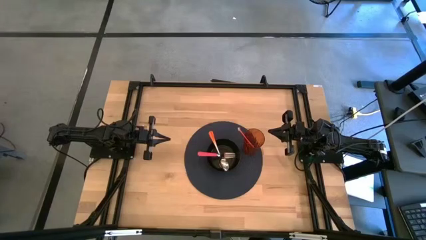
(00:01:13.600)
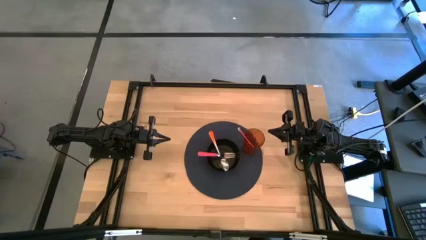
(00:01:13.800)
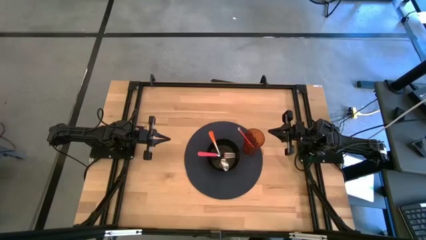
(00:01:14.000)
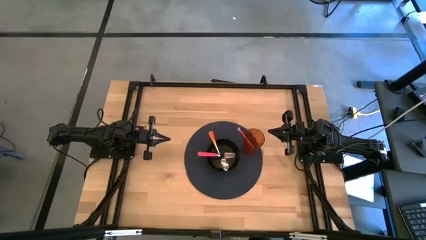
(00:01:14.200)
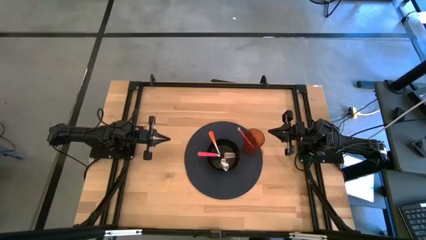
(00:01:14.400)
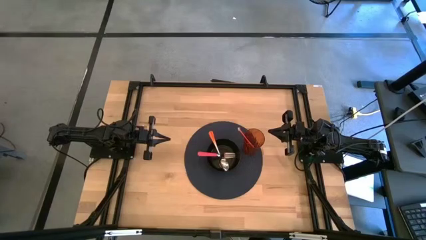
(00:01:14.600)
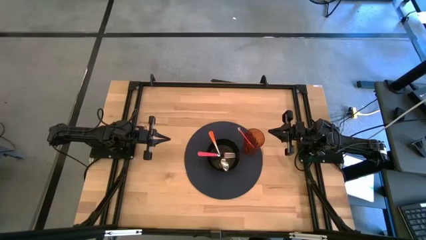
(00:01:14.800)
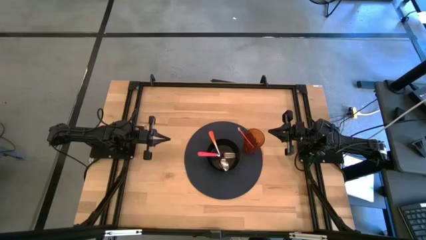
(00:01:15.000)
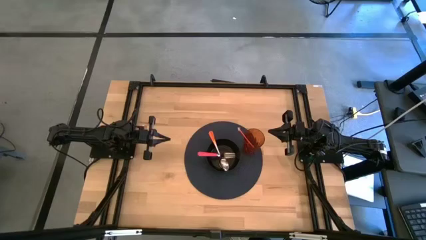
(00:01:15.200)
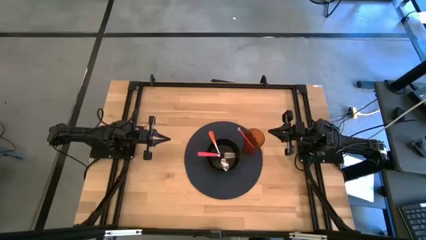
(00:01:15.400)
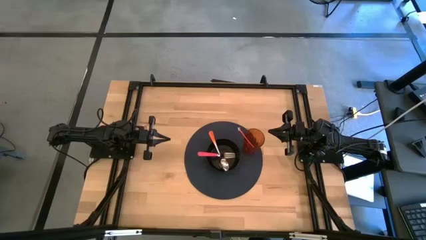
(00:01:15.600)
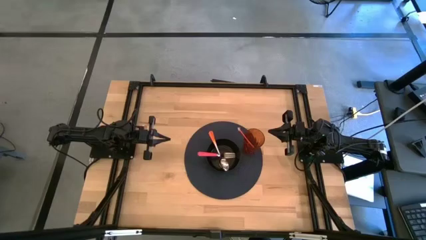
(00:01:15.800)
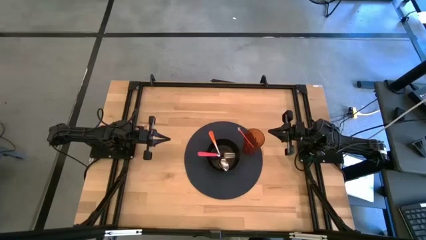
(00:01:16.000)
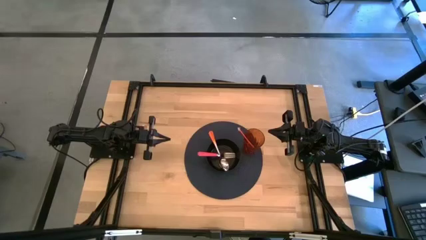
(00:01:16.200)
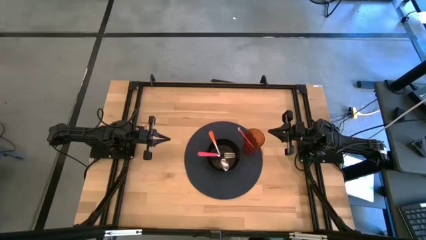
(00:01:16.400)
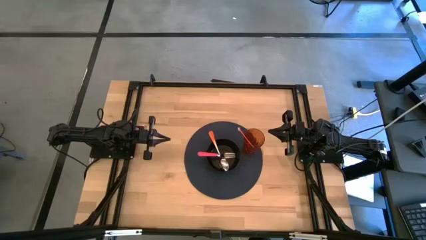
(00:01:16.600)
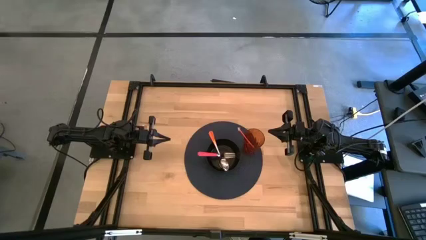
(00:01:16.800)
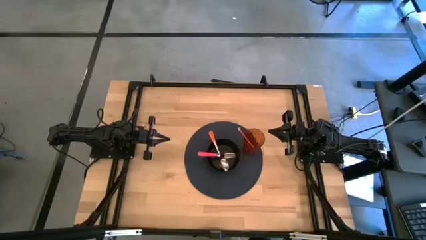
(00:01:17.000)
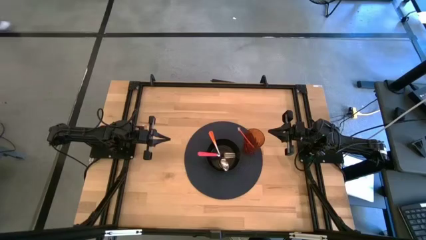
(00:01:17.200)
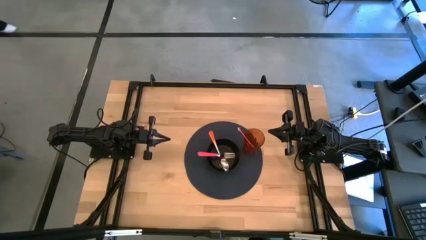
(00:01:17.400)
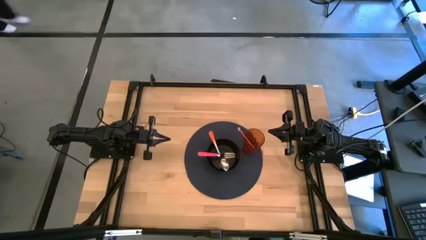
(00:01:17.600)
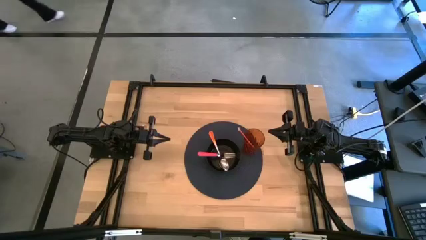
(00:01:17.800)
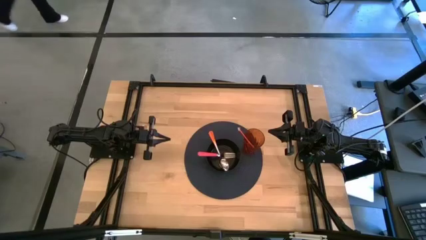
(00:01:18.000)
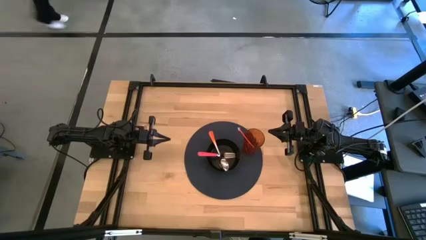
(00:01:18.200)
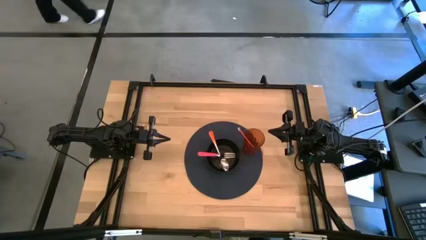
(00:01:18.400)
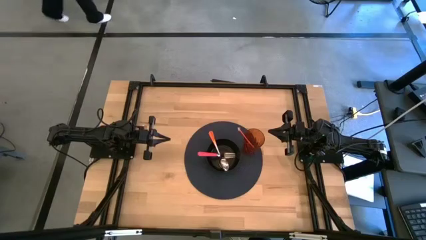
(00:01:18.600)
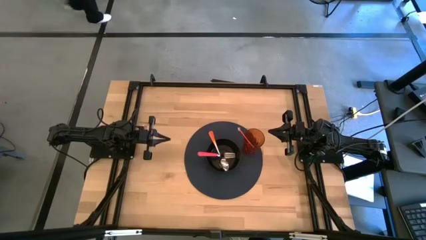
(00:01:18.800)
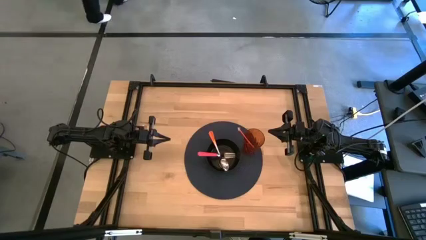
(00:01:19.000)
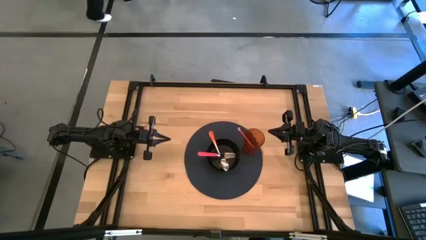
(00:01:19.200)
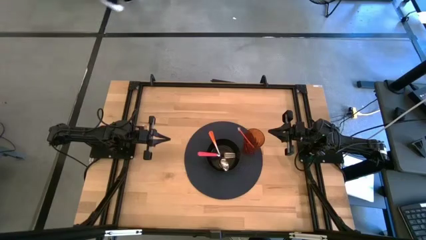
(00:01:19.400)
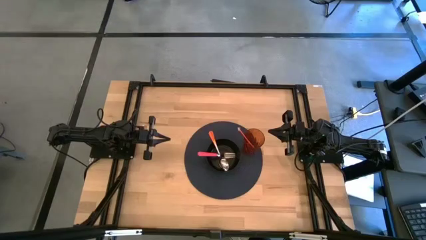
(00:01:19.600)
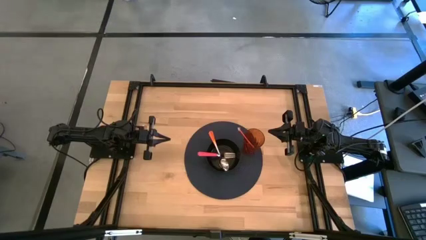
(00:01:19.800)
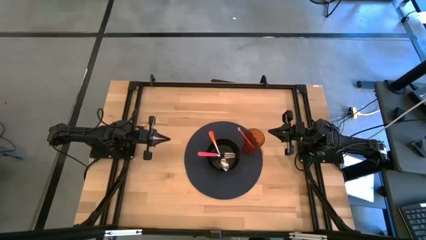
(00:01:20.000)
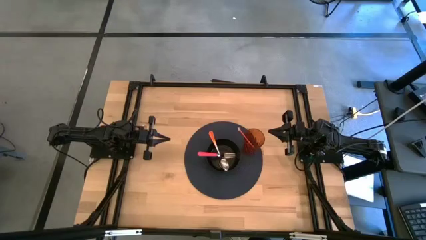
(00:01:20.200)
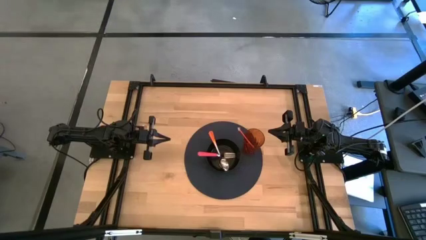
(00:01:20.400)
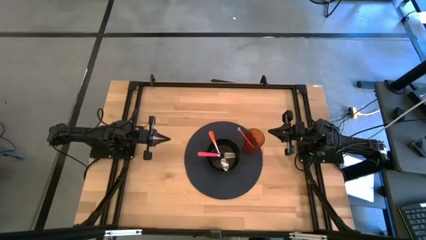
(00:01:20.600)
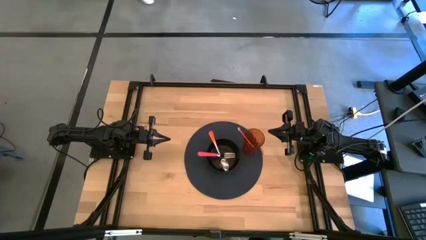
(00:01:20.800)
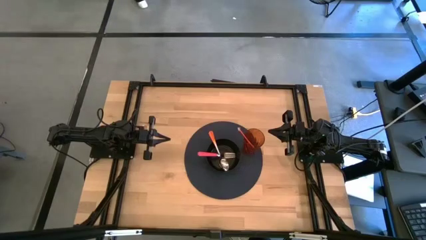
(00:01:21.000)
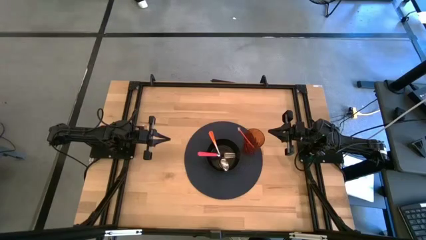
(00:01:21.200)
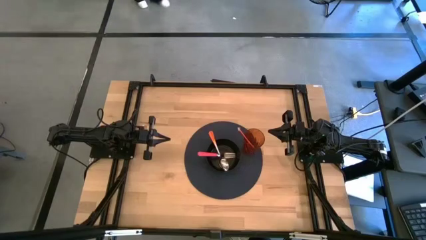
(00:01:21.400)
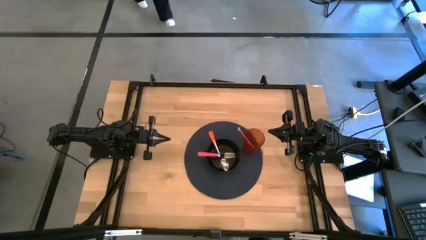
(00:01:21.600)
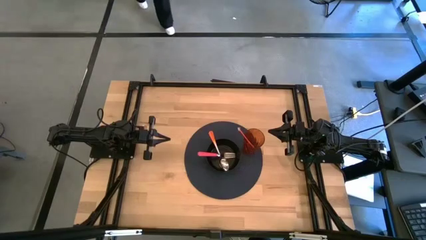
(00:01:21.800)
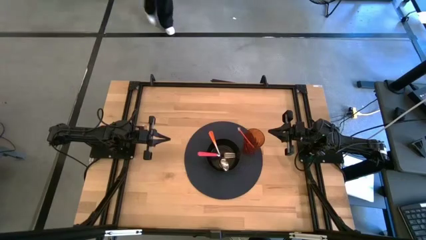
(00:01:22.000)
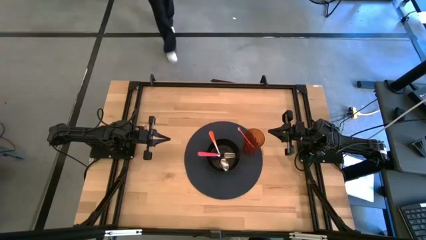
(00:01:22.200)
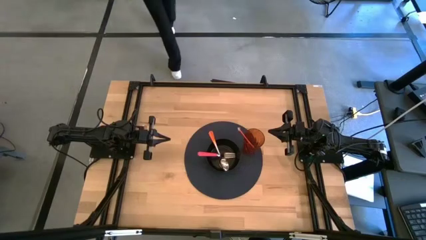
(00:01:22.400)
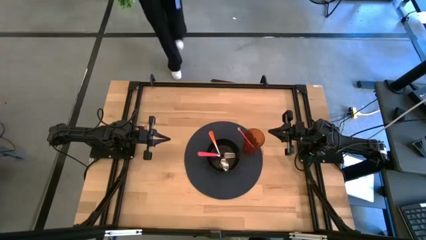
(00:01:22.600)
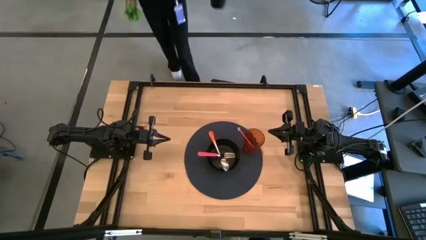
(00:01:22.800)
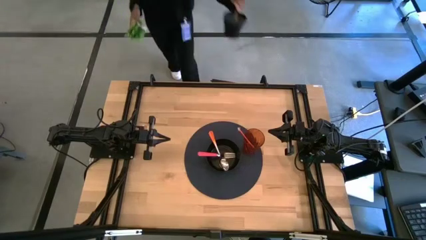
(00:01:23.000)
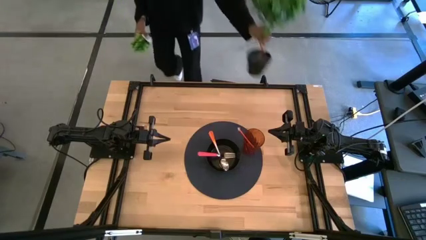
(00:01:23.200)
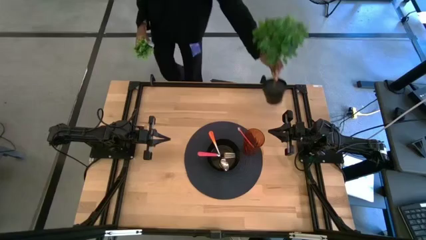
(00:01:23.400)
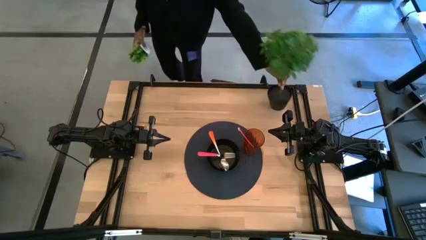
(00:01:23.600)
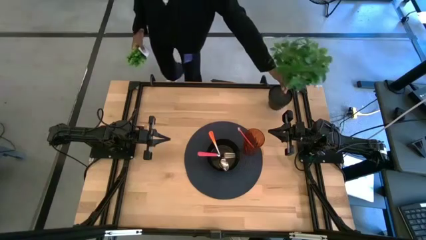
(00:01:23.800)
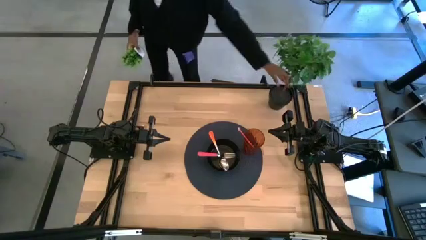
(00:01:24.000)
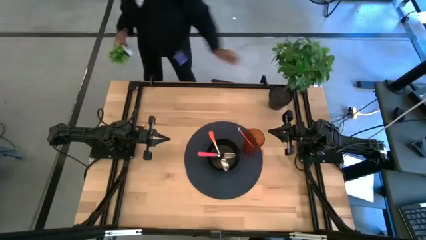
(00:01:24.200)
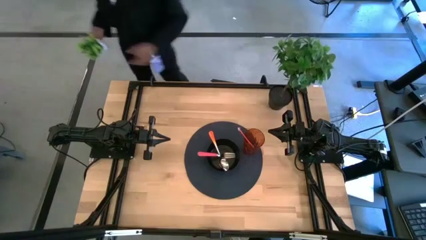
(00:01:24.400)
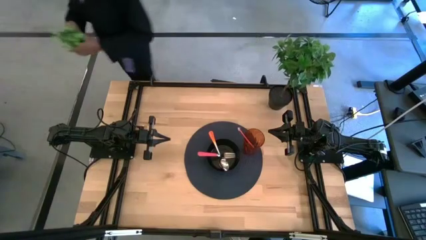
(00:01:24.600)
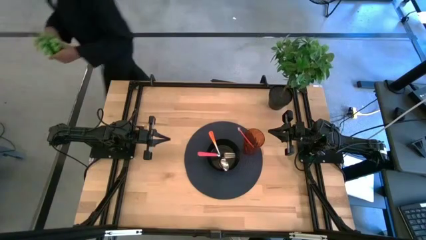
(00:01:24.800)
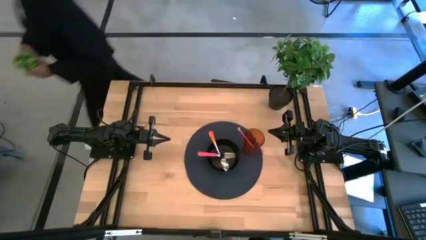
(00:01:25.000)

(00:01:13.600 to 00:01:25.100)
Task: Pick & Place Utensil
Return to Home Position

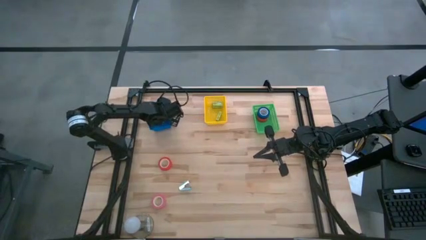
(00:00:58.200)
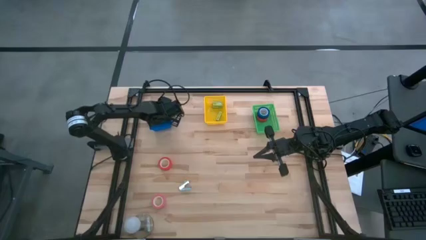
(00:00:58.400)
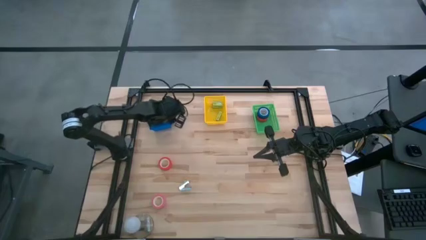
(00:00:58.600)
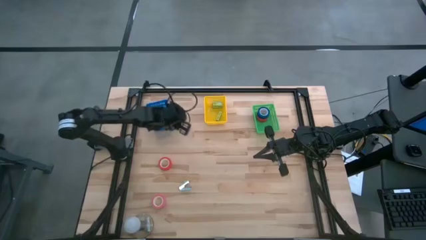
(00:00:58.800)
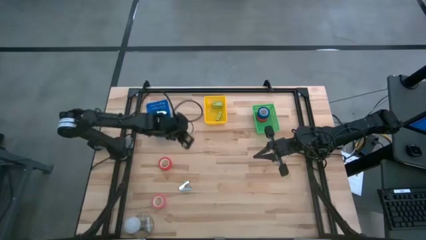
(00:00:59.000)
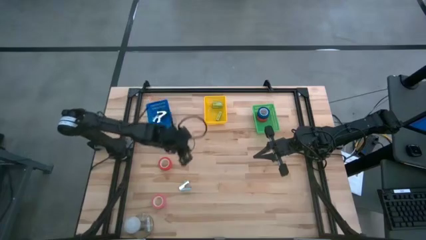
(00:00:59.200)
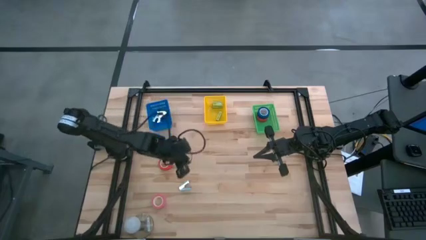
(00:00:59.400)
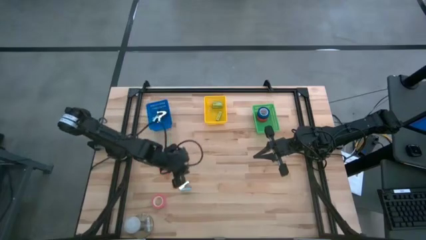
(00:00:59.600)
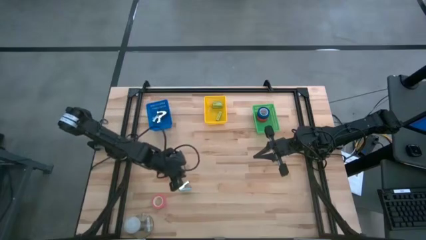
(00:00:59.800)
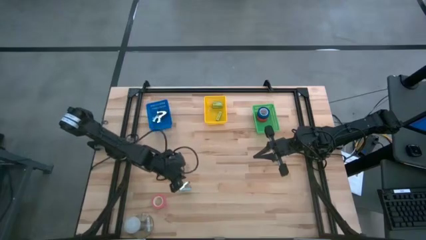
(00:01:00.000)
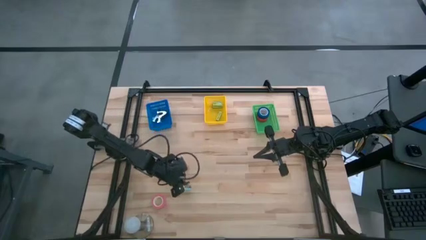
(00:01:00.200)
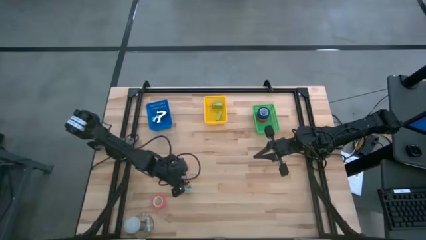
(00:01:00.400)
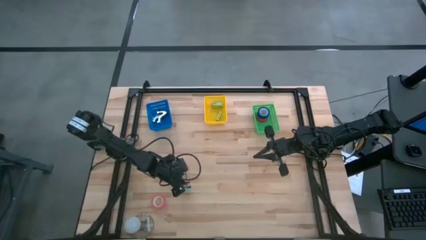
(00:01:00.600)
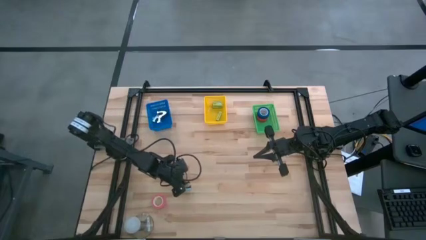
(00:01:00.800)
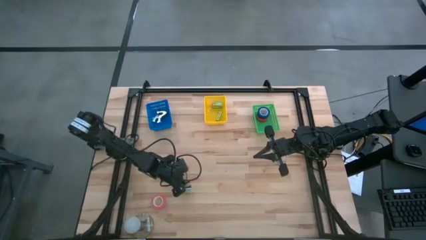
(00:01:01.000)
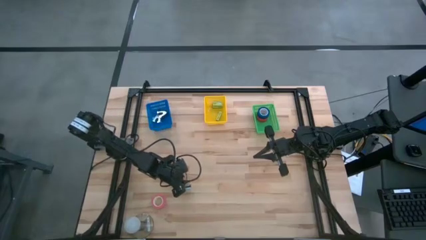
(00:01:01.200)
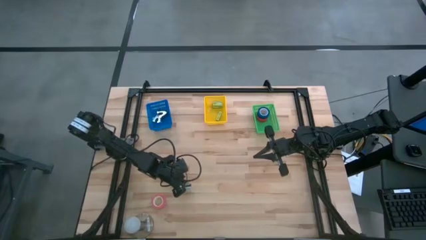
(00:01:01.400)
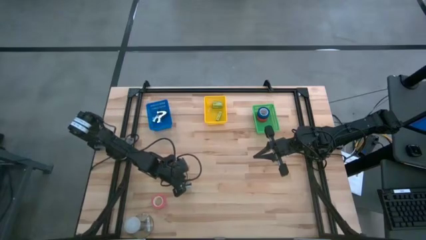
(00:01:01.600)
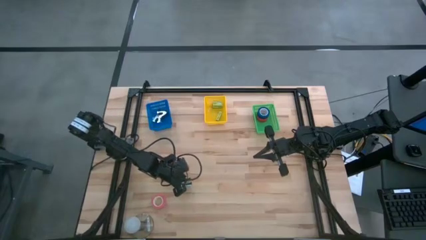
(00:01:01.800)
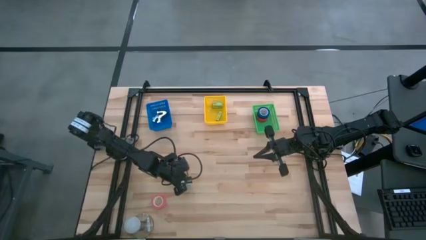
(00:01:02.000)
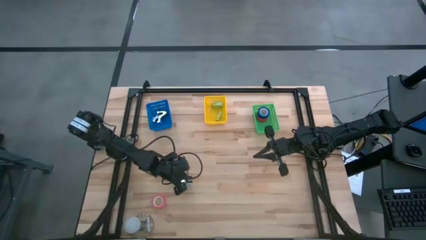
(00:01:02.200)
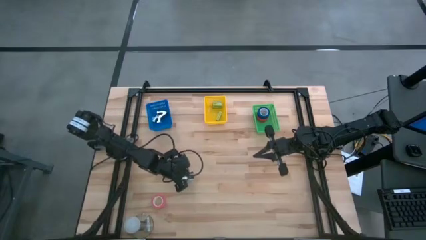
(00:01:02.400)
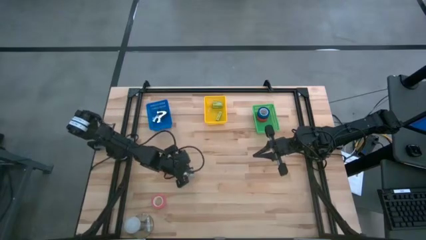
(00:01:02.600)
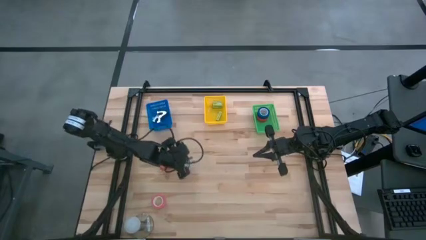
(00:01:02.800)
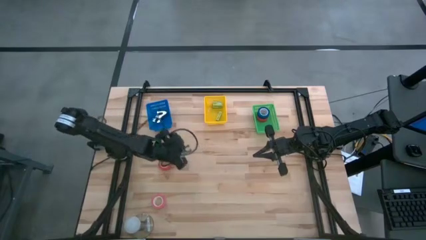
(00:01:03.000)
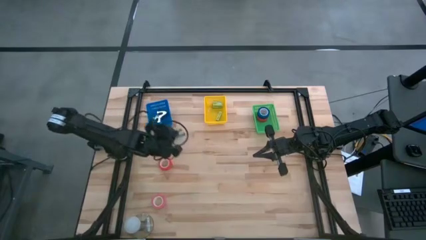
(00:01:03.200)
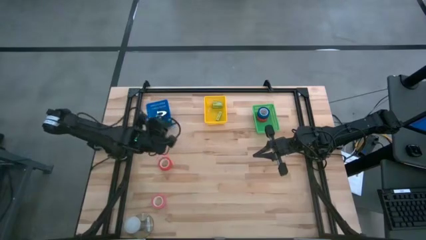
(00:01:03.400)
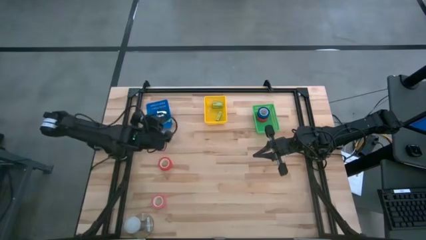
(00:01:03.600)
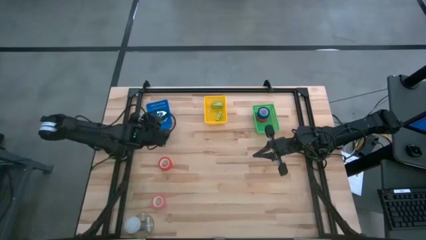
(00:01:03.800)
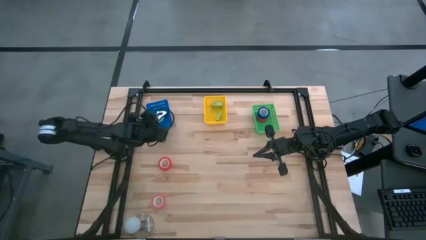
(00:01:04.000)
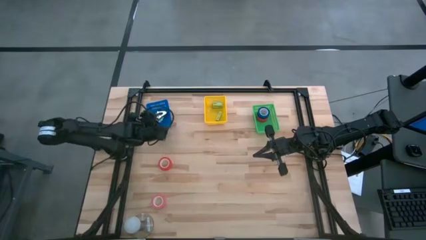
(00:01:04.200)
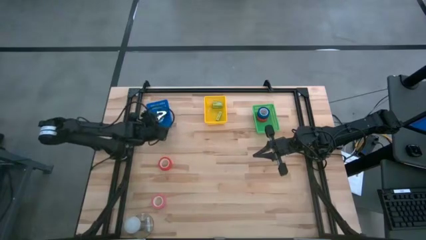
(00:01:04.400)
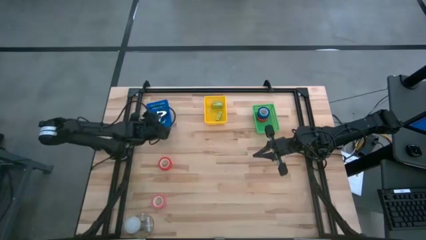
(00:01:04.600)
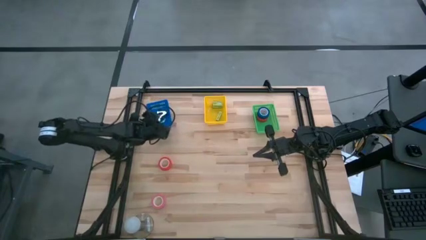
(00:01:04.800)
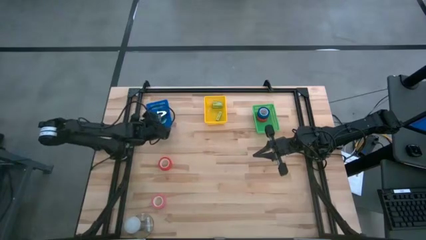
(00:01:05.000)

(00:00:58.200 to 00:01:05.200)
Task: Pick and place Stapler, Stapler remover, tape
Put the light blue staple remover into the blue bin
